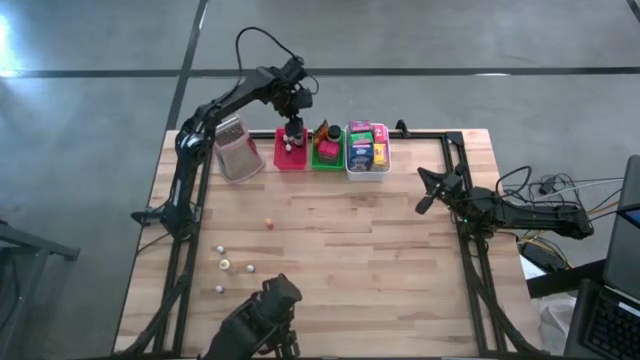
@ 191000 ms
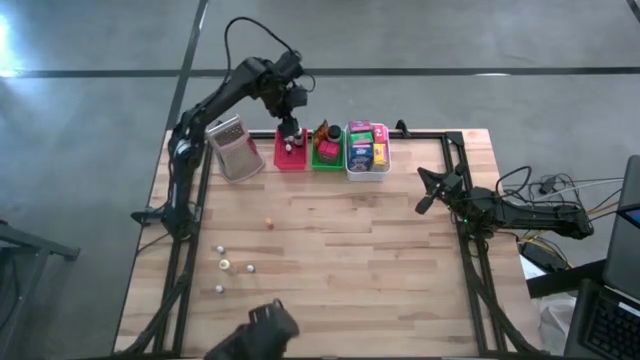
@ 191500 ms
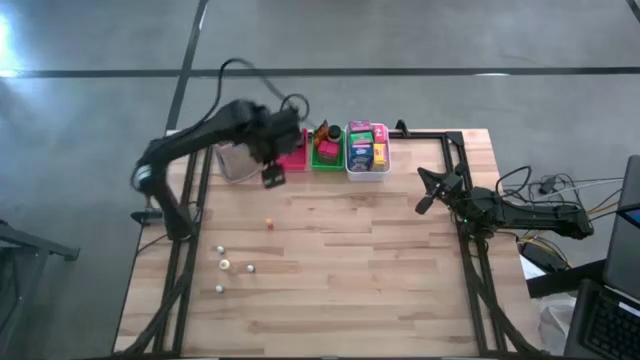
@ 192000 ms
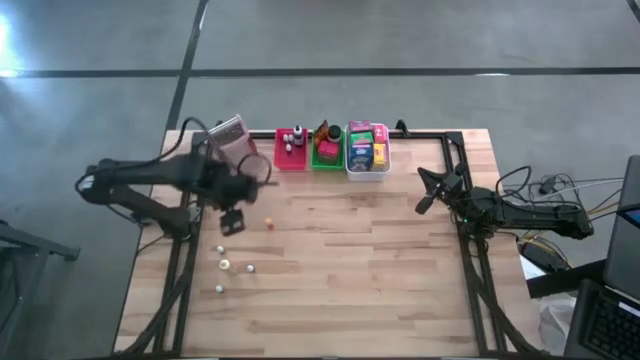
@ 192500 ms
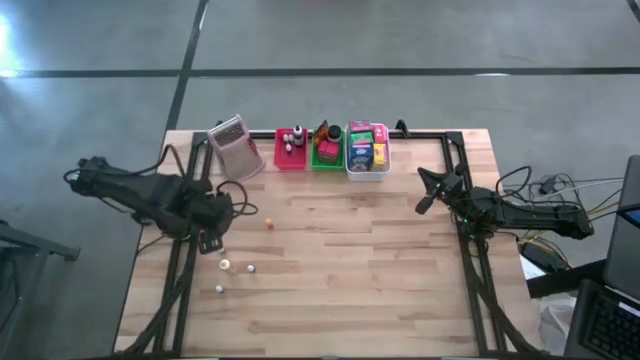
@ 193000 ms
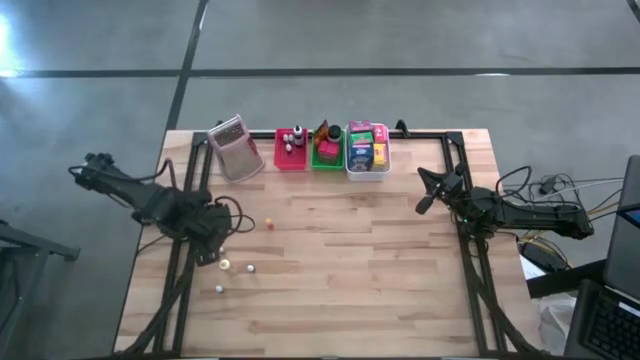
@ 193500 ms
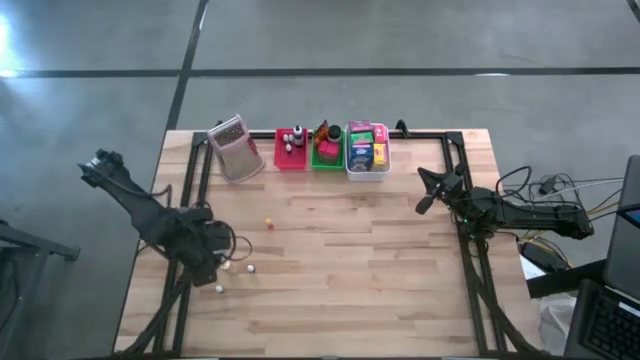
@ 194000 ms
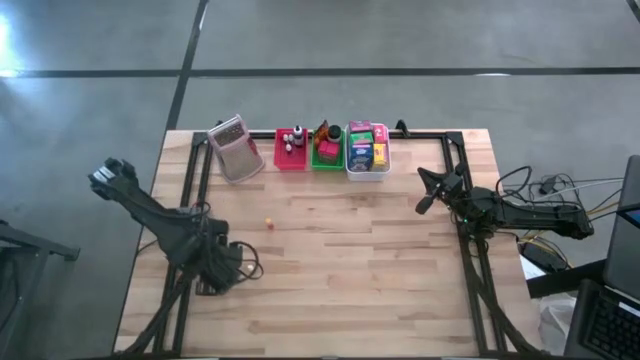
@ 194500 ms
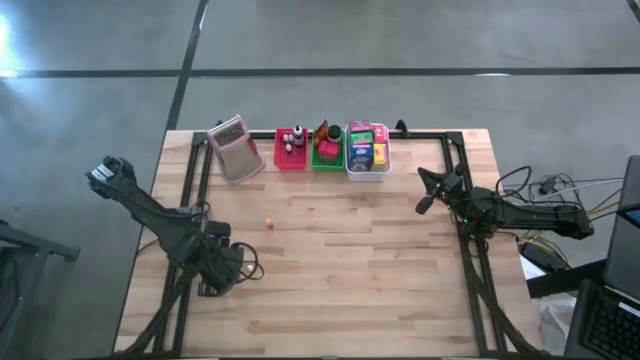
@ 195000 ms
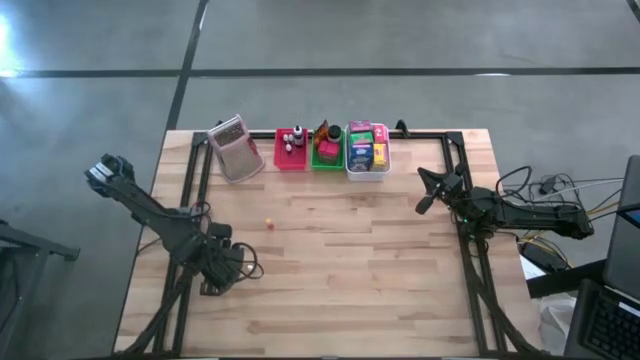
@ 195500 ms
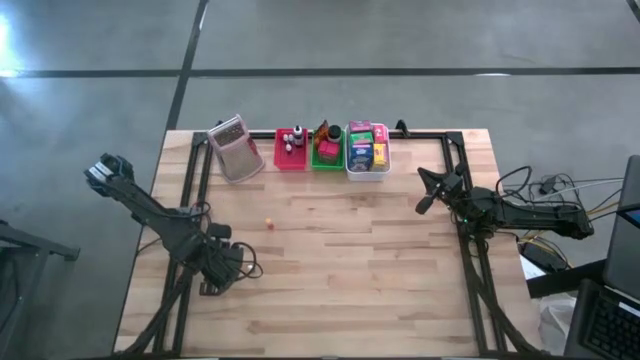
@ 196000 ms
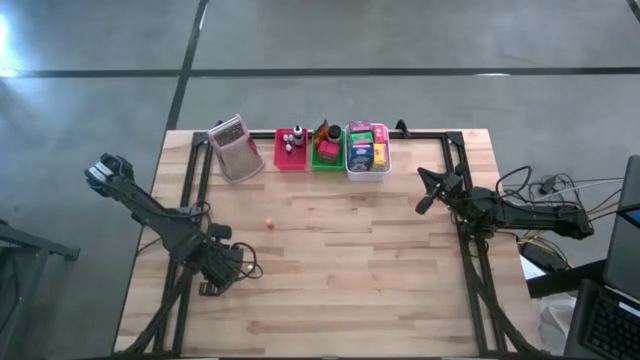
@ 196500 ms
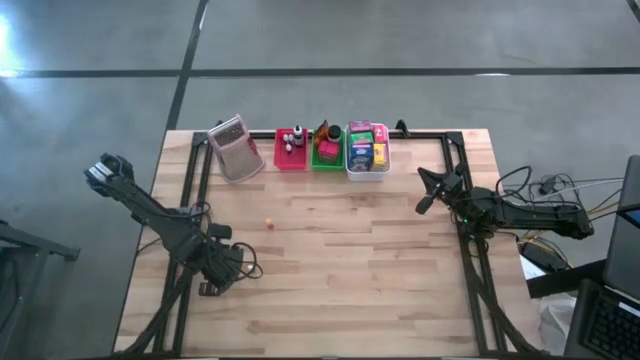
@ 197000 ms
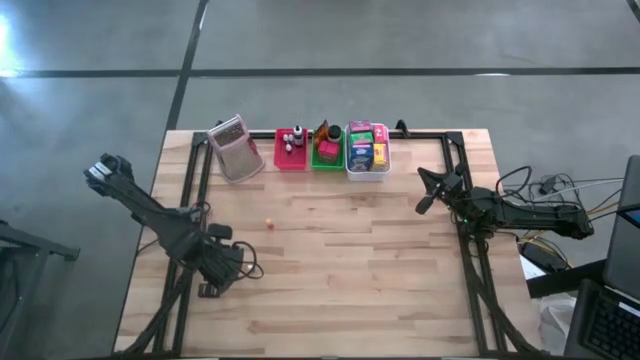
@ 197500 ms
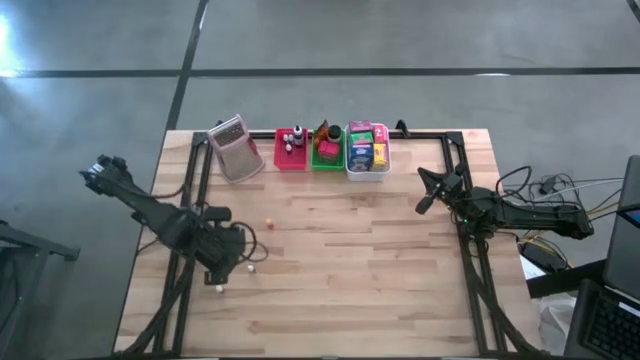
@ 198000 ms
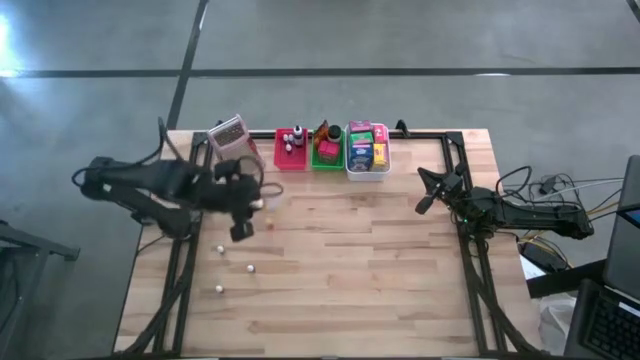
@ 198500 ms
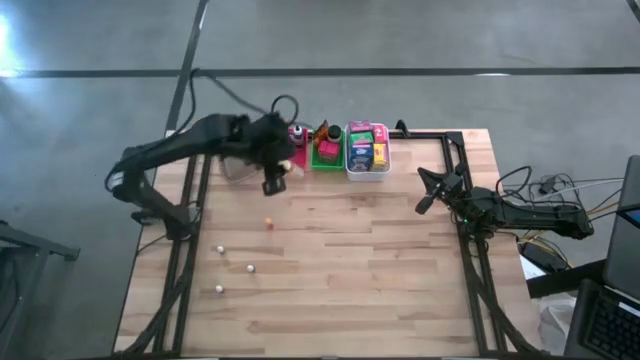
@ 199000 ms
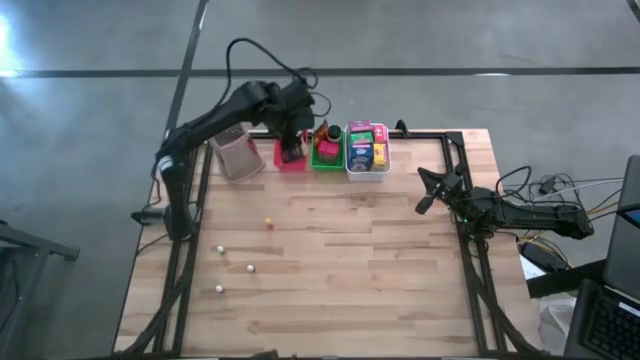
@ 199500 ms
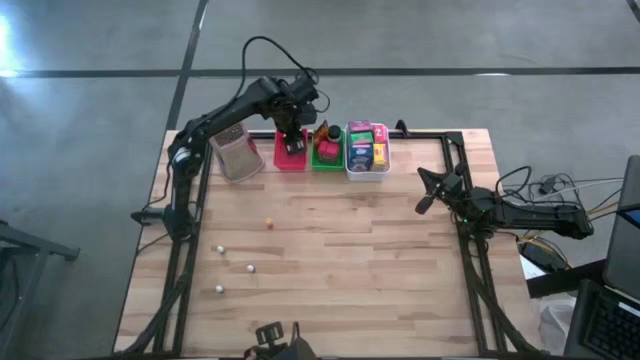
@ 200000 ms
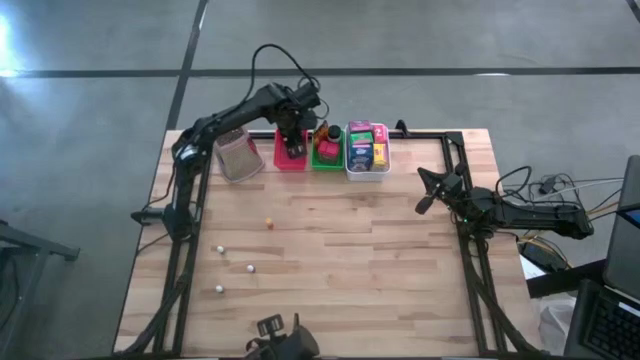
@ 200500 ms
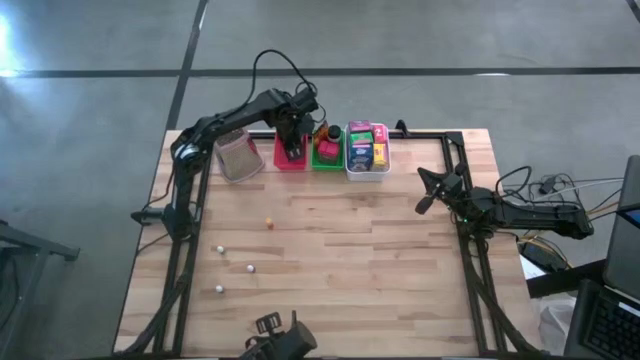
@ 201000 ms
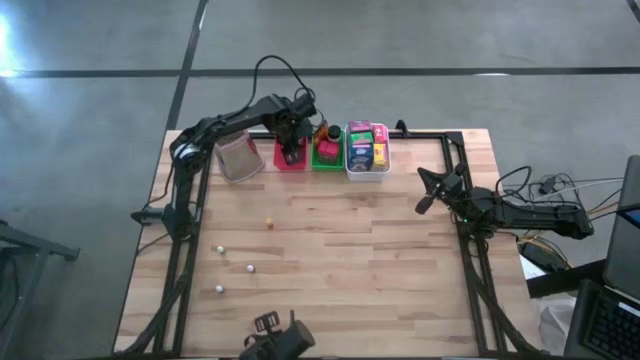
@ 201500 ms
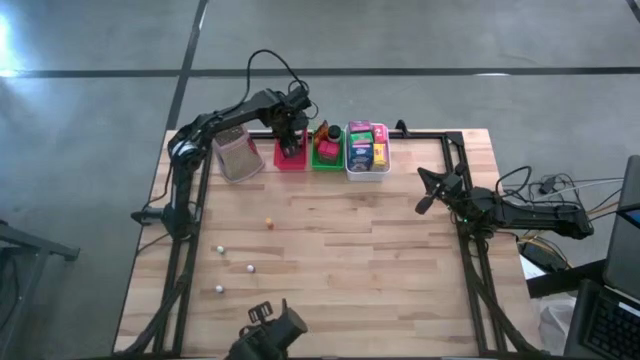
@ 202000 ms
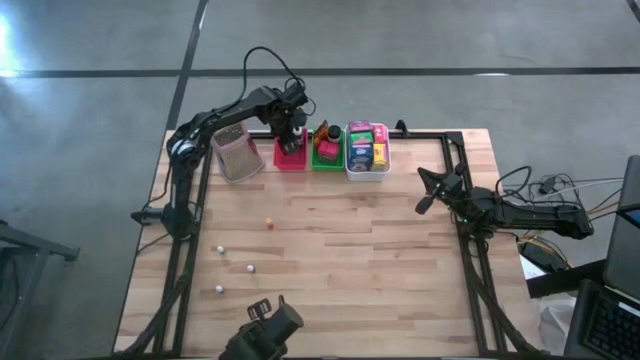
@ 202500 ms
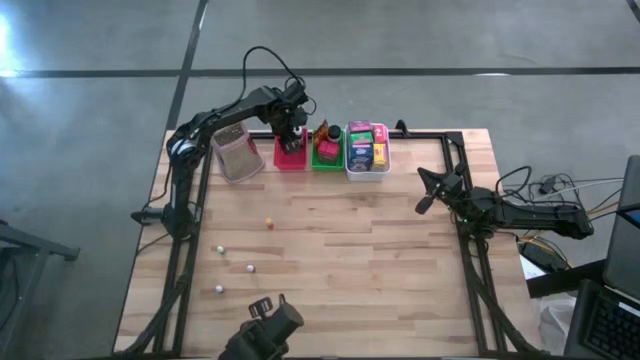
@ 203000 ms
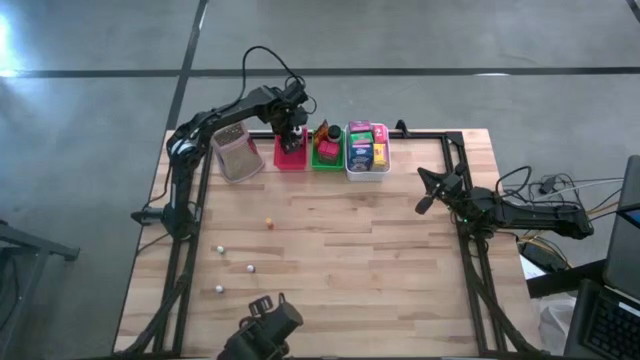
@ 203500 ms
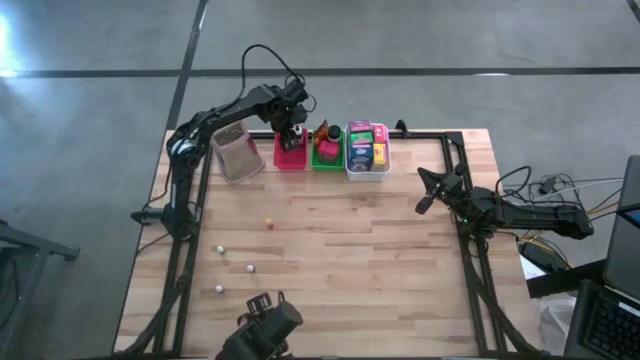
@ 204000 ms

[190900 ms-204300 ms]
Task: Pick & Place Kitchen Items
Put the large yellow food coloring bottle into the red bin

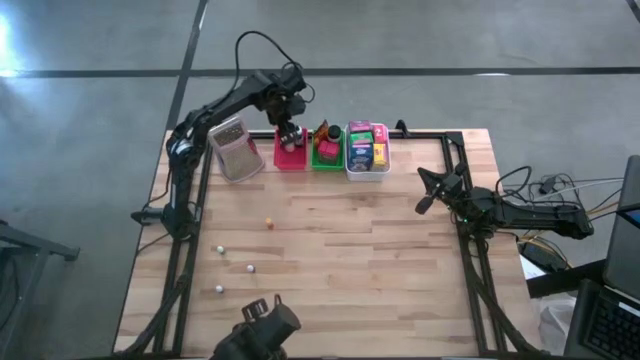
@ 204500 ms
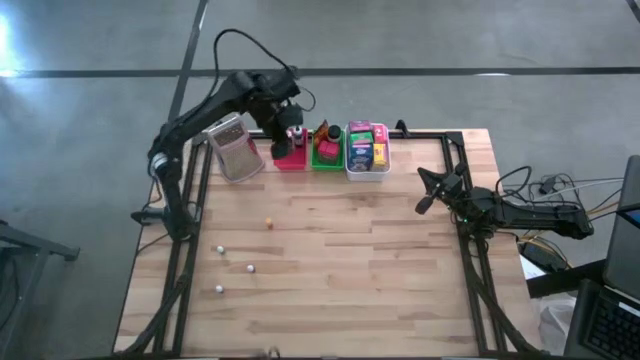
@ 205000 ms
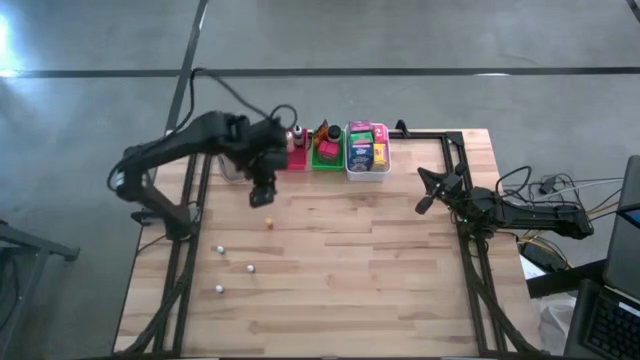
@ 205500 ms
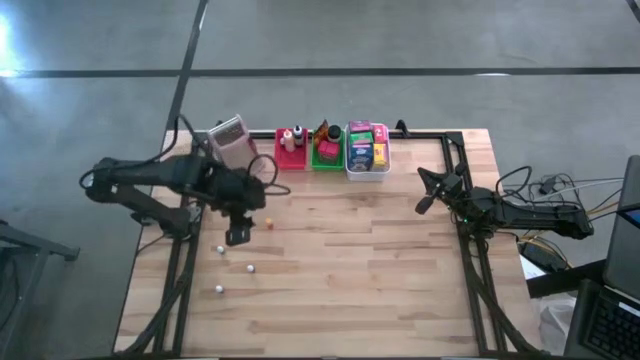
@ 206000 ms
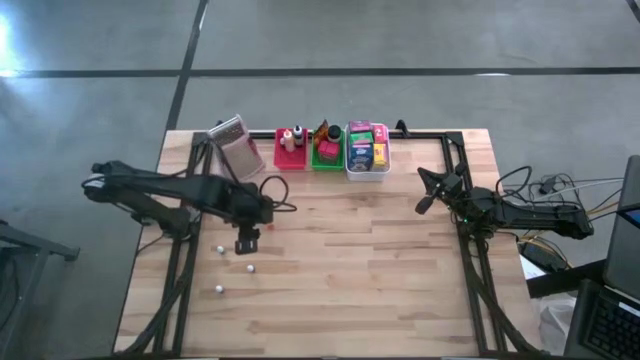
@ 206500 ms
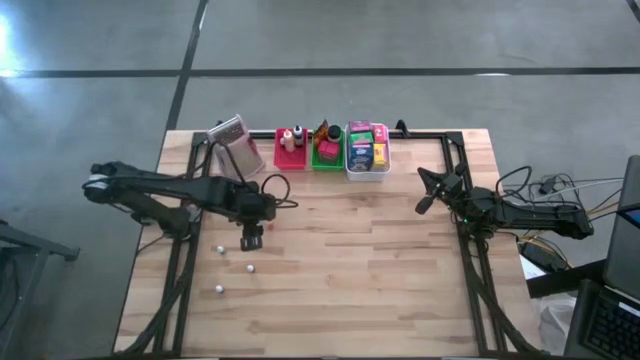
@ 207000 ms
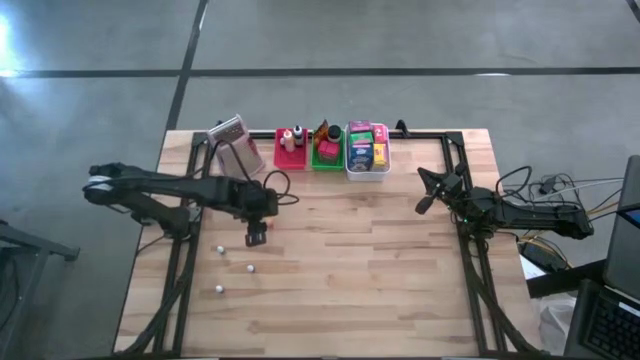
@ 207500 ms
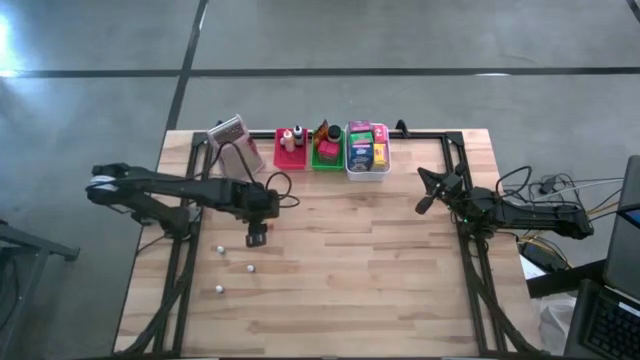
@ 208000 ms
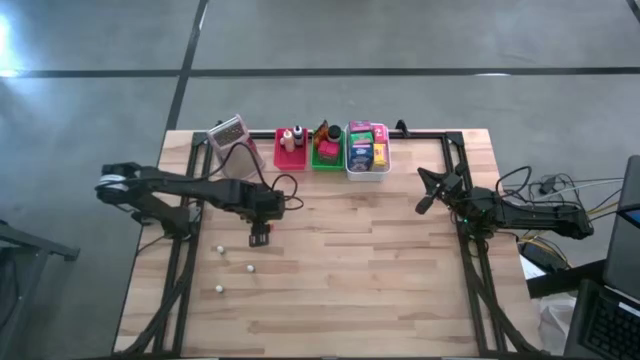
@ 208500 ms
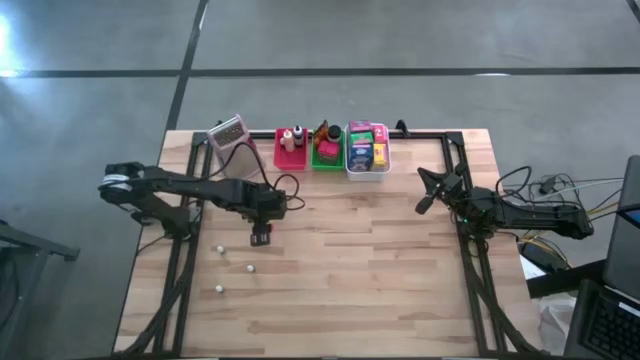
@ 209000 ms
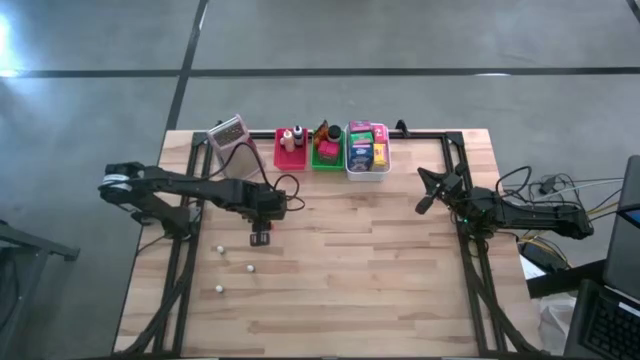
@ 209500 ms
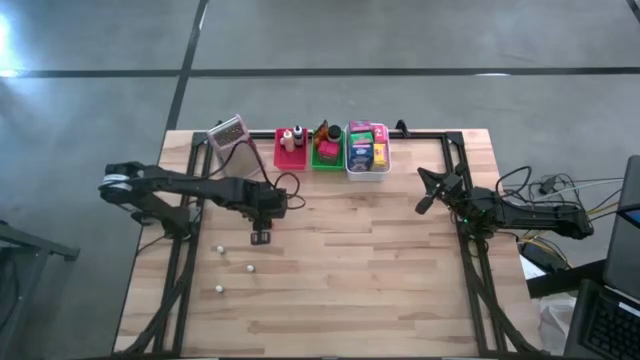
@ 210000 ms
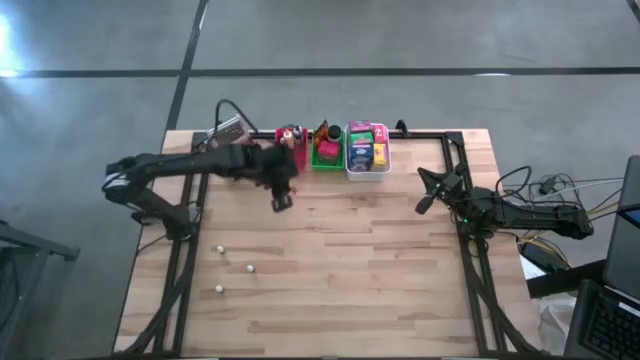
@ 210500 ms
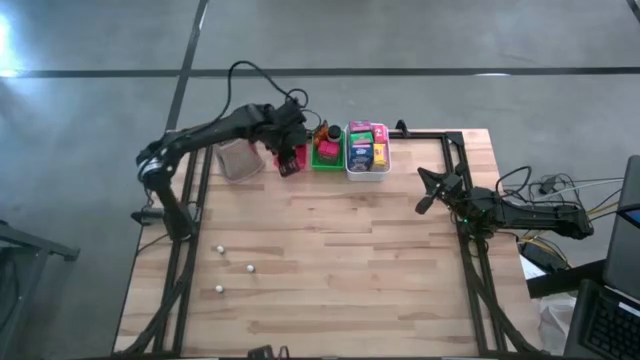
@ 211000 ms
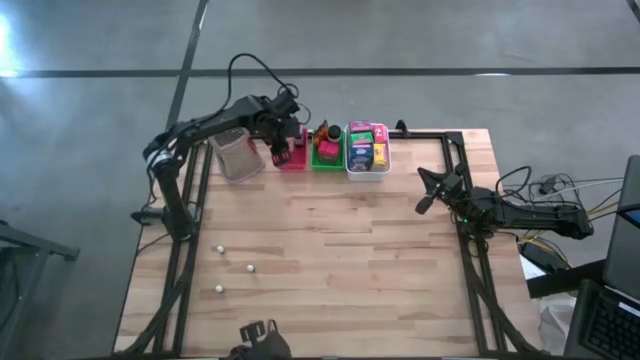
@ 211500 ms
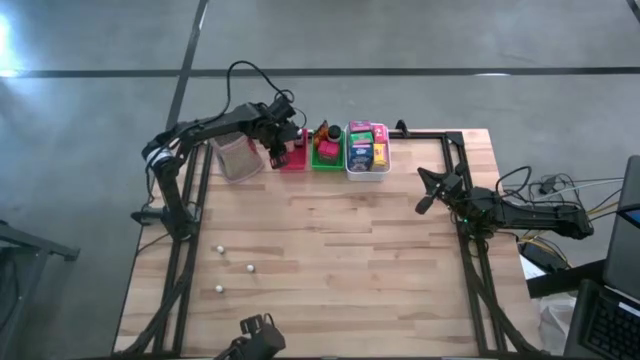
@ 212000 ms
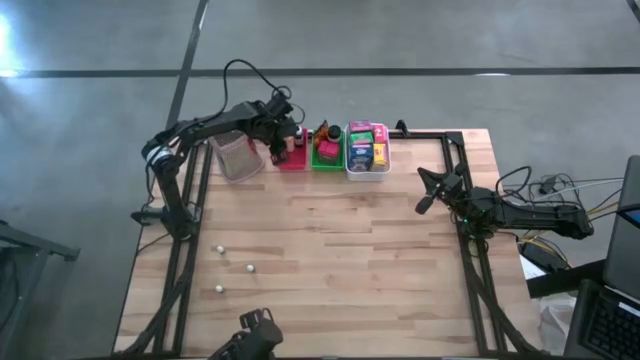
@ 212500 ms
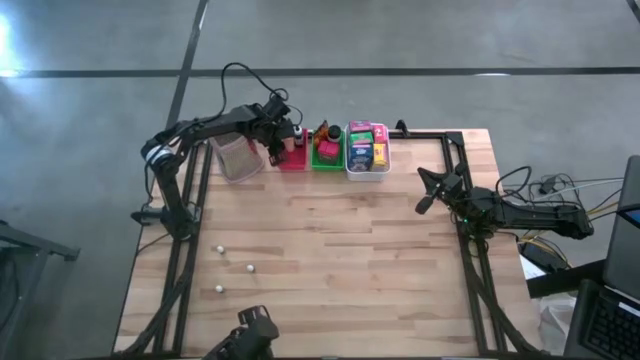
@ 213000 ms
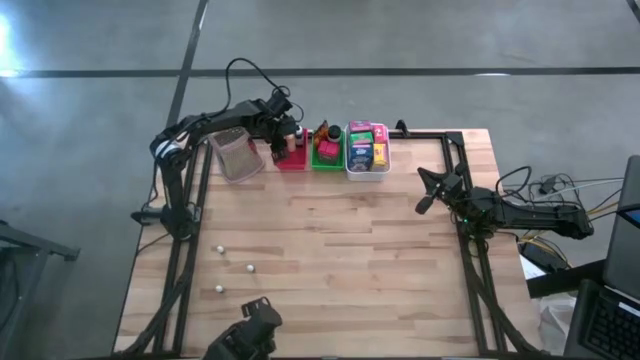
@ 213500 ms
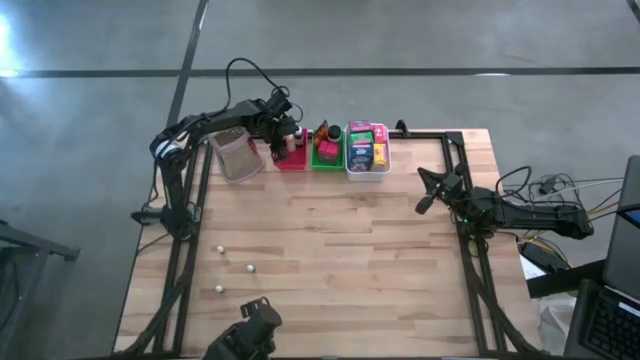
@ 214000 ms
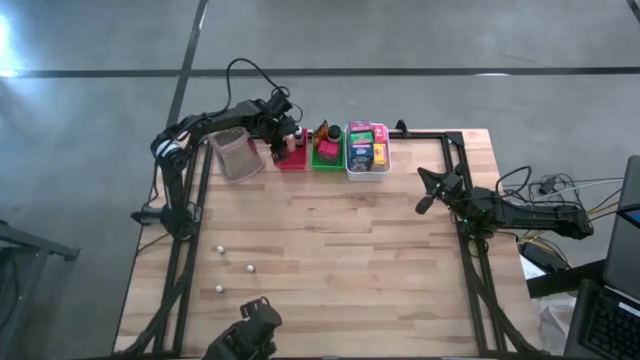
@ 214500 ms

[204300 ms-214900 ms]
Put the small orange food coloring bottle into the red bin
